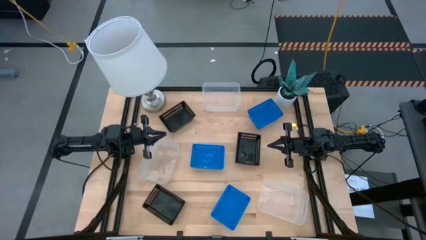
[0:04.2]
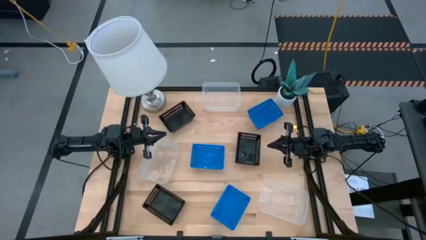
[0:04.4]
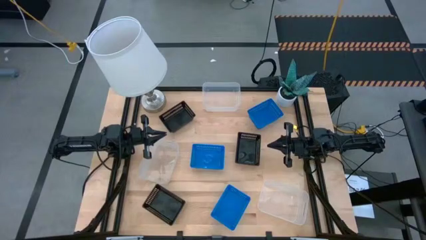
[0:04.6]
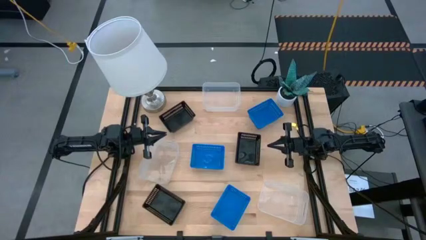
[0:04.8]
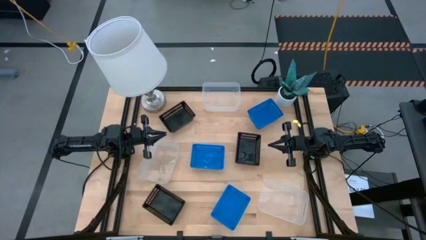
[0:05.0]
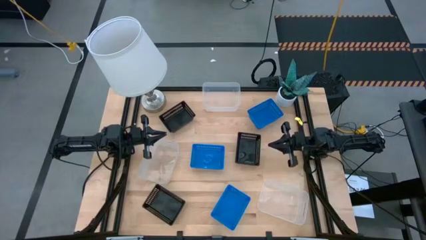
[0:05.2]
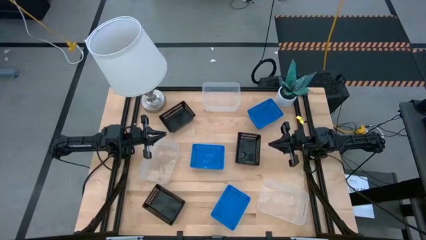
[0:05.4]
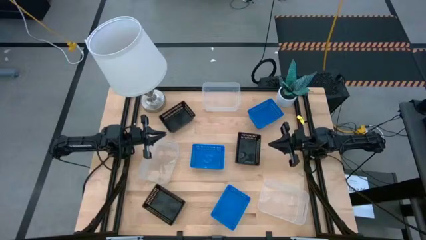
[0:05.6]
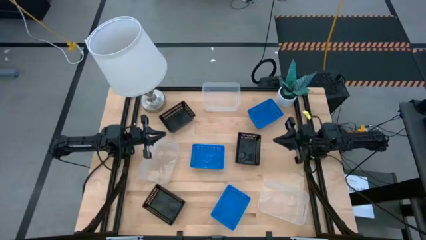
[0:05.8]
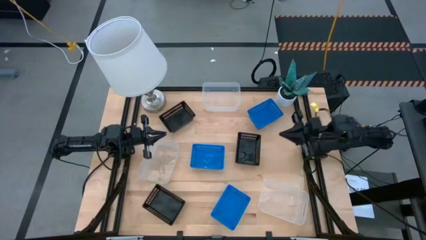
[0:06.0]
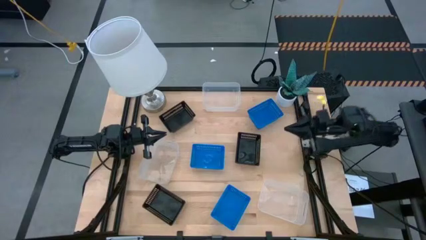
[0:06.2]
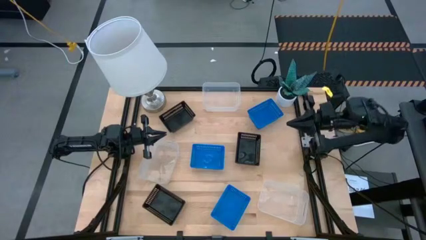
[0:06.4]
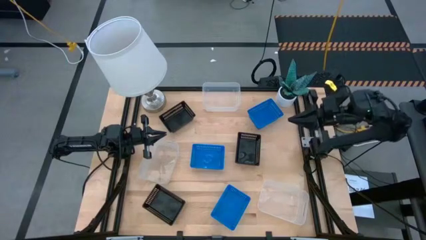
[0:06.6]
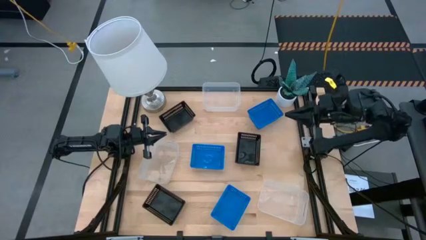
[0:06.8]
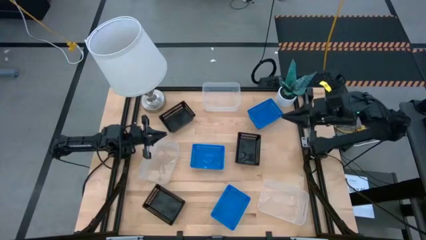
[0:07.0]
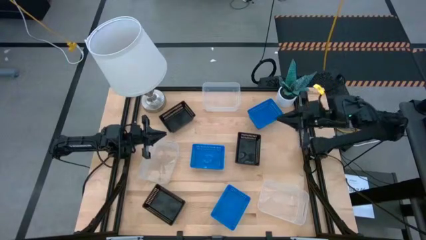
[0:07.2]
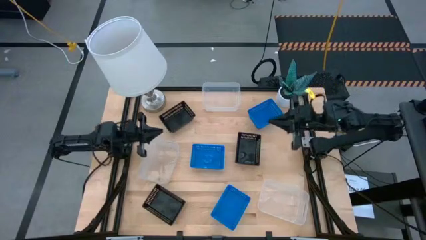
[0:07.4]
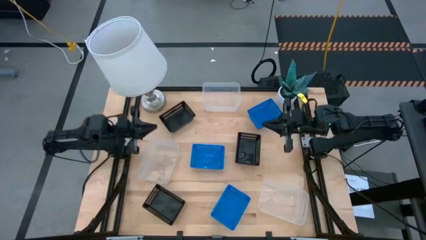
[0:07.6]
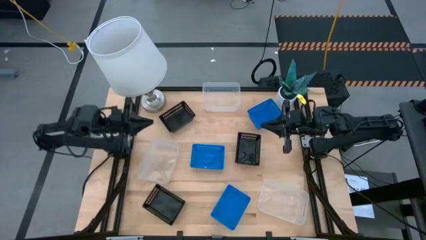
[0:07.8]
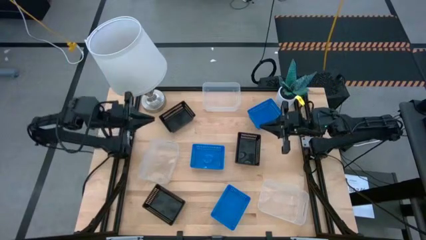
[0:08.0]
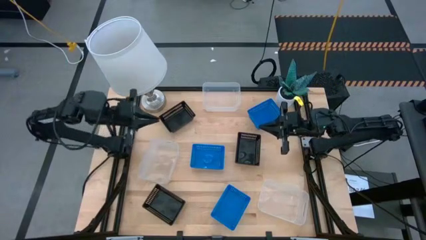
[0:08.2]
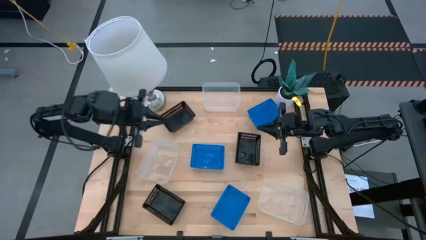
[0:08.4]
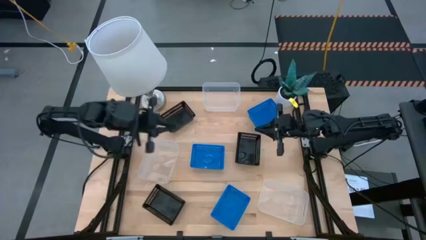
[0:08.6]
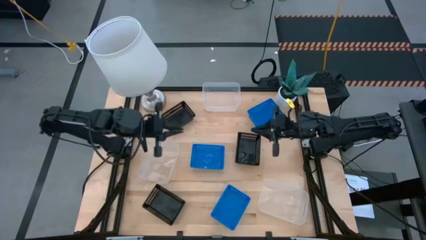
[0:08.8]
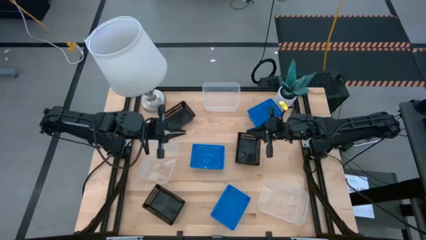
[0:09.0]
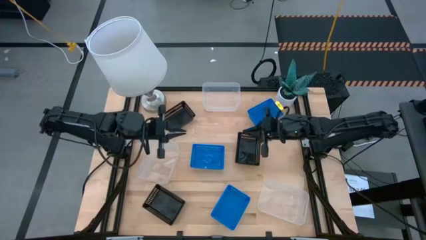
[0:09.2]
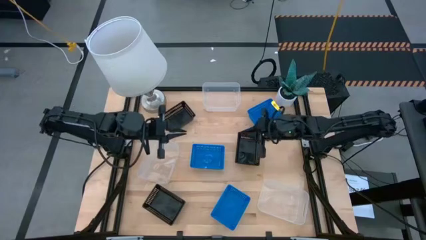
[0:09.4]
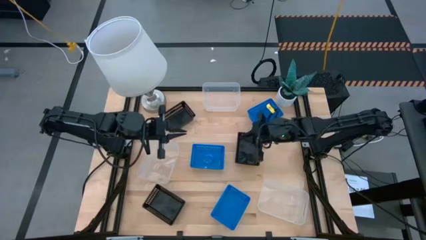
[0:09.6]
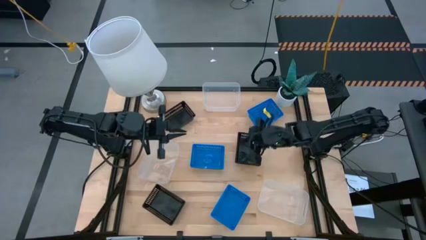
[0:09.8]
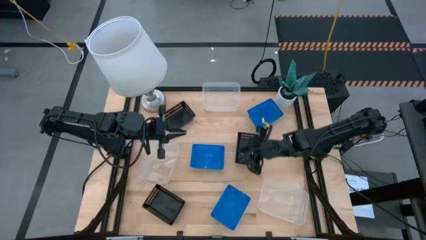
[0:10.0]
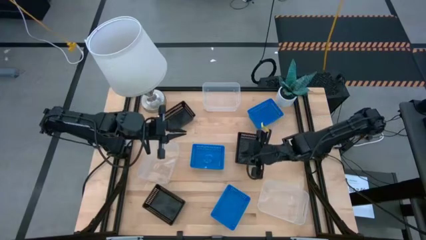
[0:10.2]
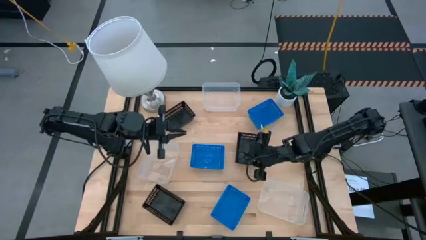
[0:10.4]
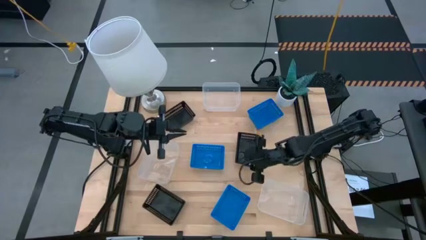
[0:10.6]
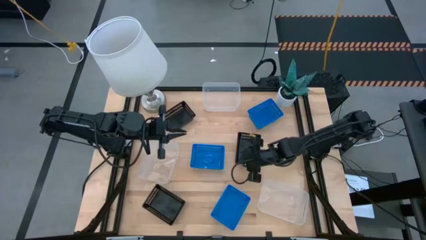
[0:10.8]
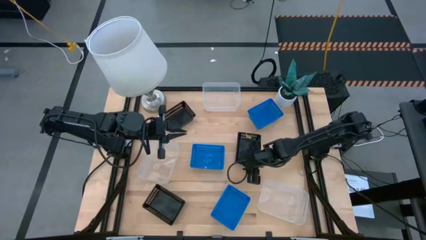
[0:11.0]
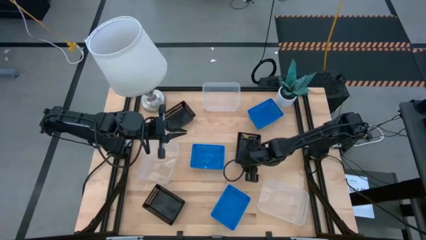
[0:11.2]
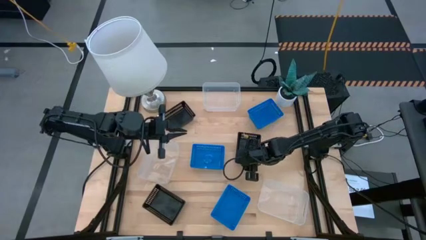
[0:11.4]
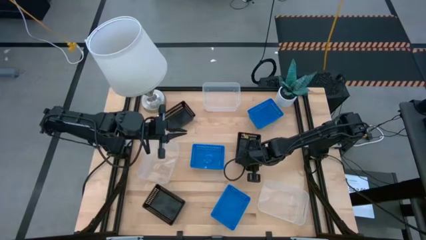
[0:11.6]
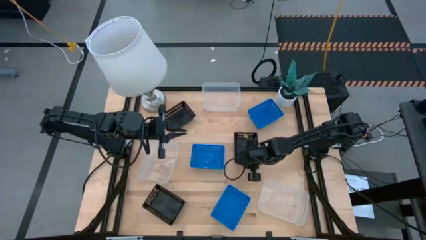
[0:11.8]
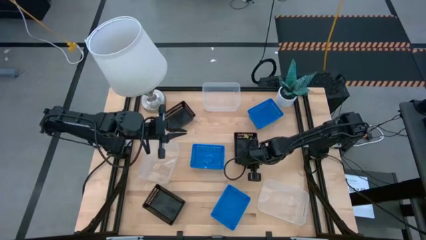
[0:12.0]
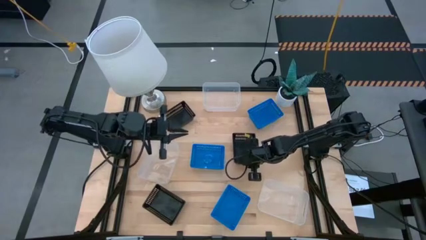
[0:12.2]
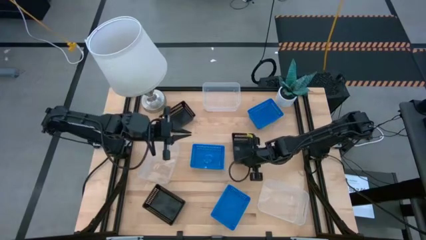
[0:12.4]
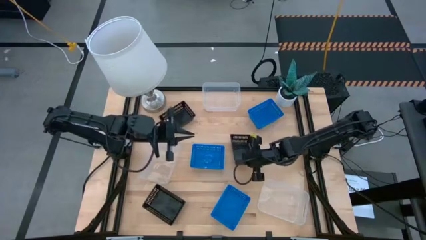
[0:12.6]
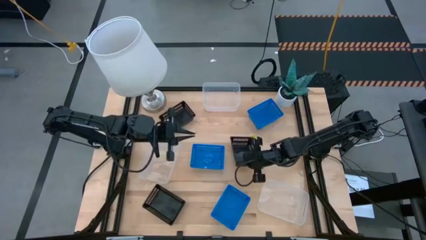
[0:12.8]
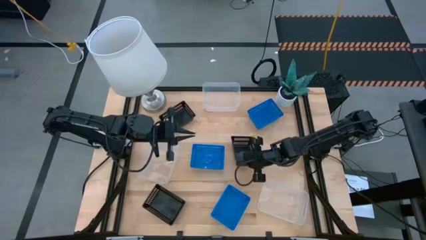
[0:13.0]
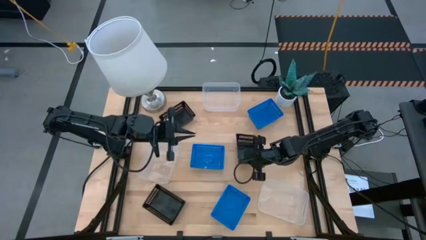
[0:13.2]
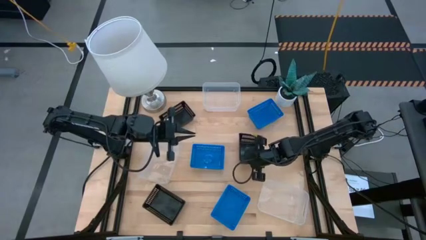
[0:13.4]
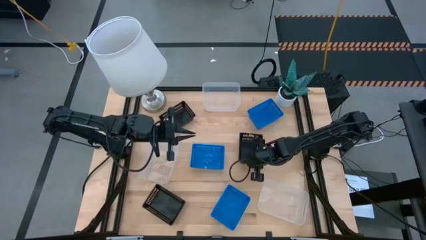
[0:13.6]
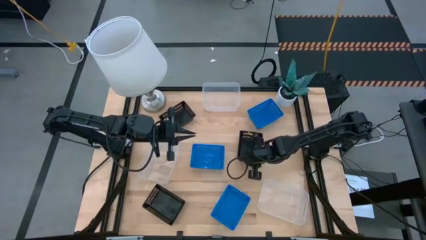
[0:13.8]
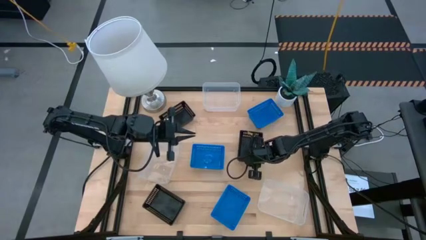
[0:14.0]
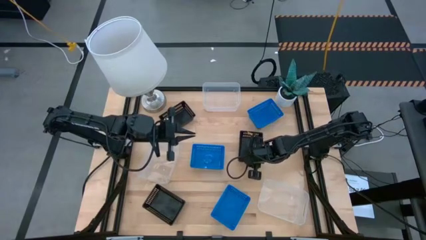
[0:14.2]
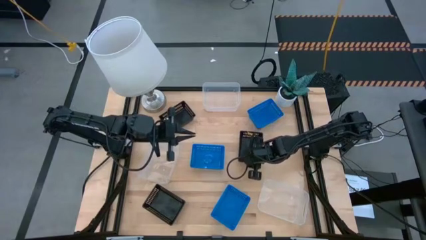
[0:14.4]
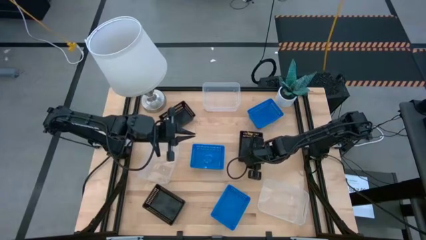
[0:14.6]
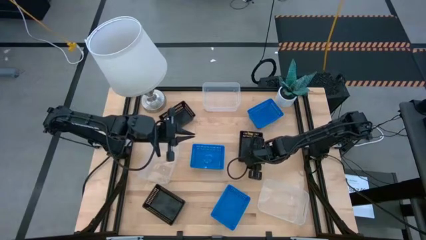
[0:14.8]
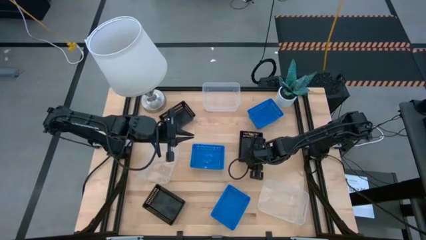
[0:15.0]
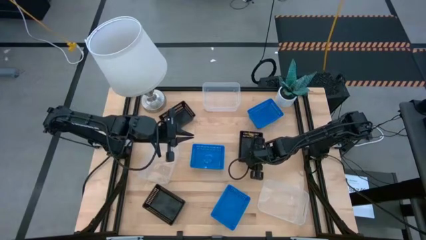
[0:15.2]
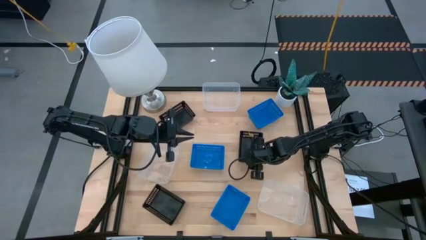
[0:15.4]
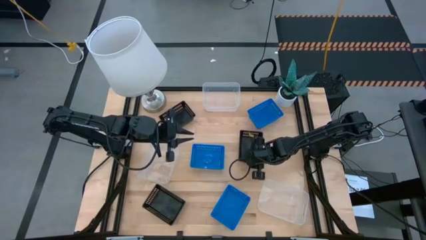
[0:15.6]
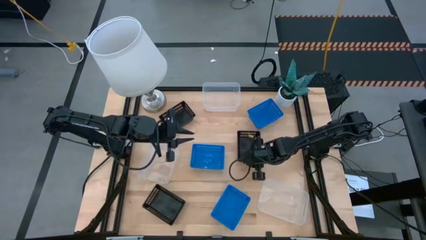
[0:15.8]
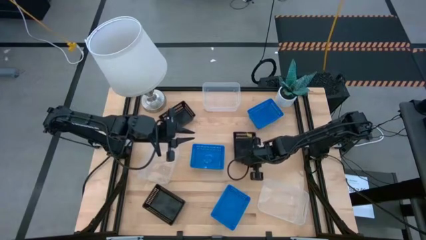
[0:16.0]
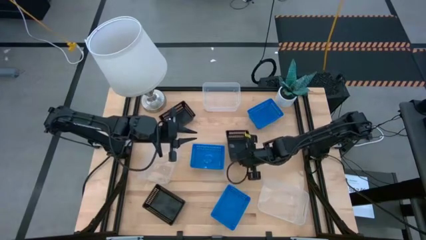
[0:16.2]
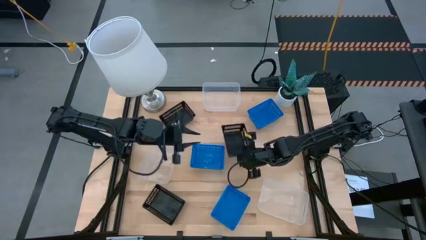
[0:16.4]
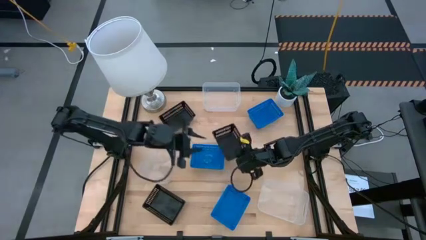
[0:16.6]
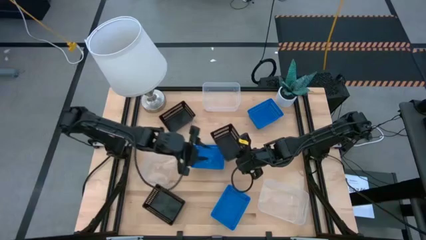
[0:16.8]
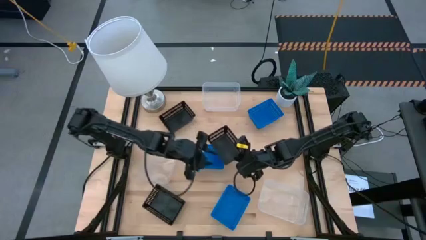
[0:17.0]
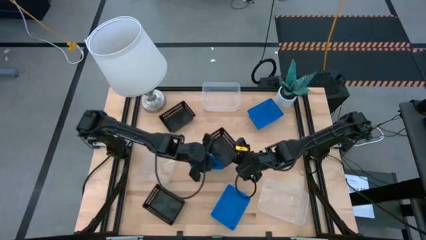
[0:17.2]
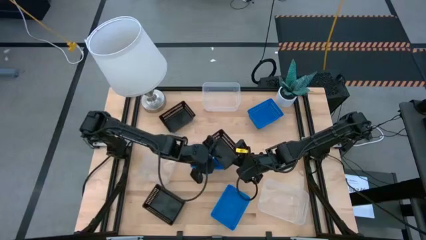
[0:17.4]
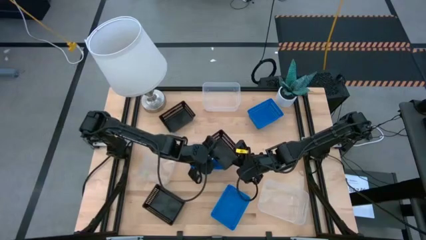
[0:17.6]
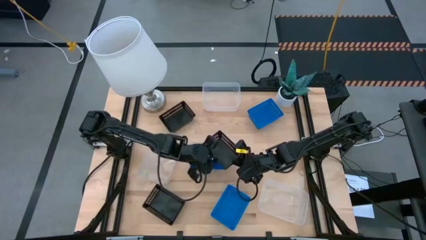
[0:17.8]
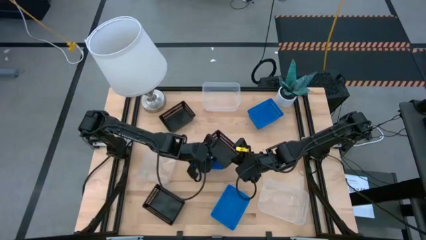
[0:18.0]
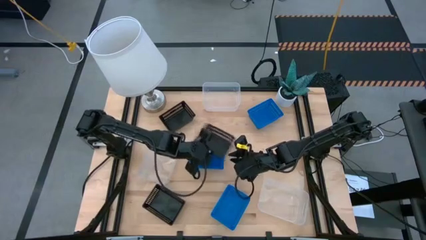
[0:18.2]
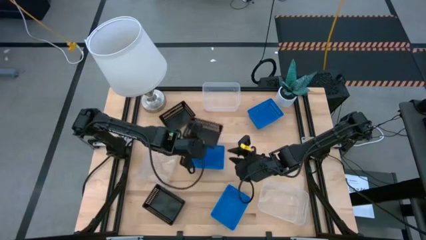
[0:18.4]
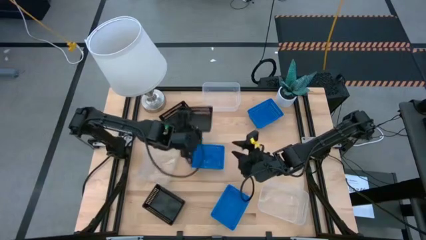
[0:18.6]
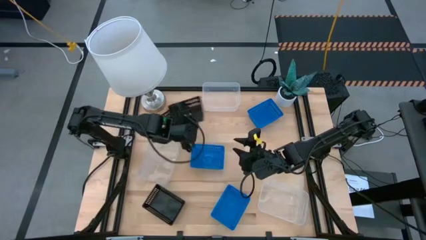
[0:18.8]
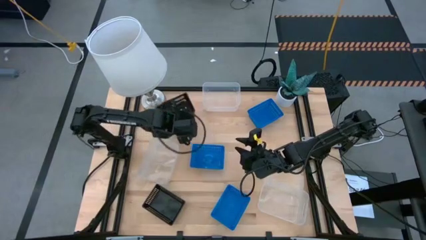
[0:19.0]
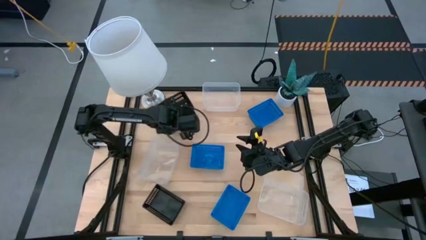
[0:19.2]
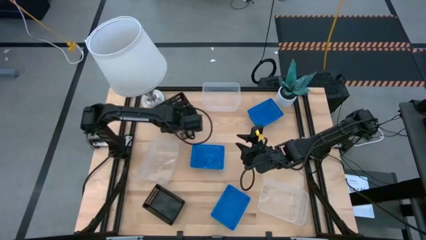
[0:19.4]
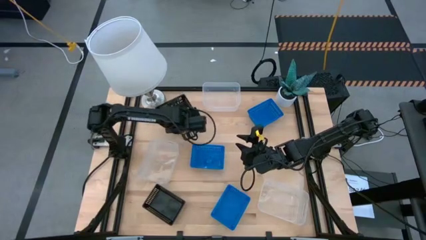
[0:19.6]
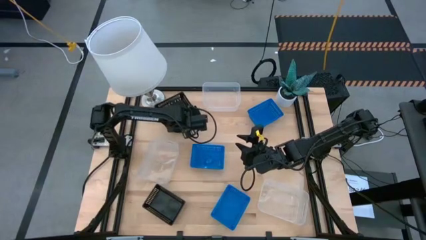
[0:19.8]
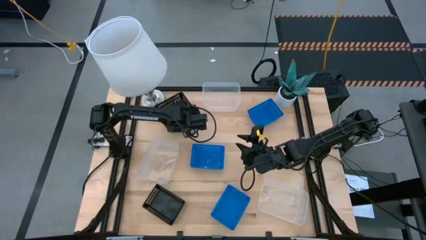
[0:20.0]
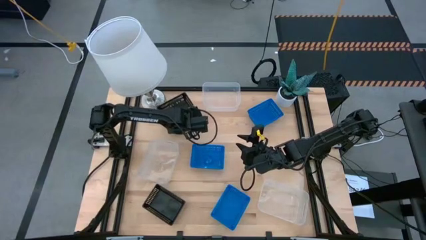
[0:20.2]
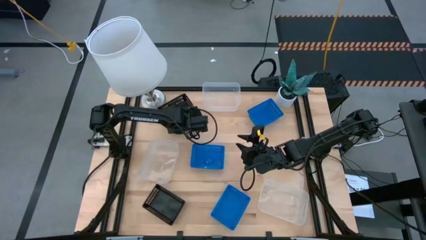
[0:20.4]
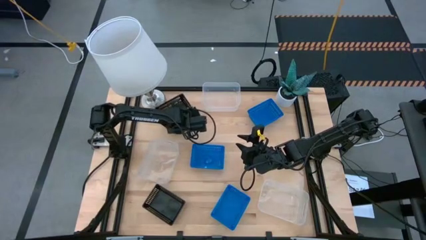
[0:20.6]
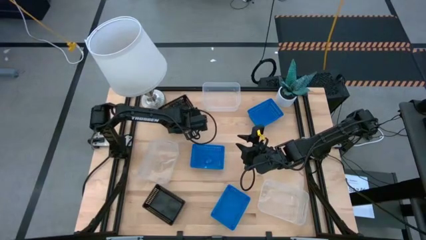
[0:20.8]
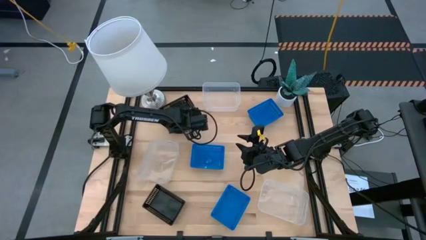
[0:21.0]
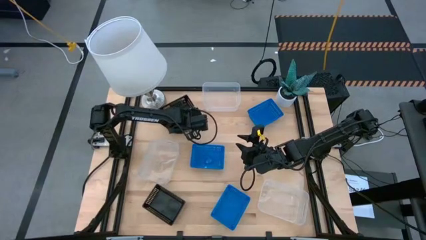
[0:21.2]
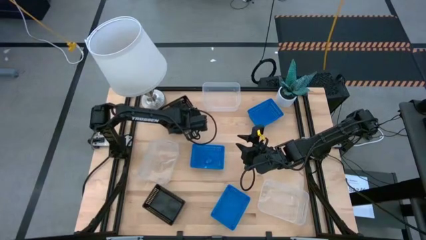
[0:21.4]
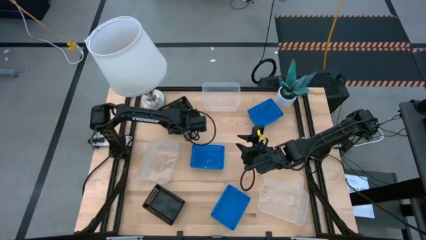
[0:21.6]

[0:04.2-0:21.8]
Stack the right black bin on the top left black bin
